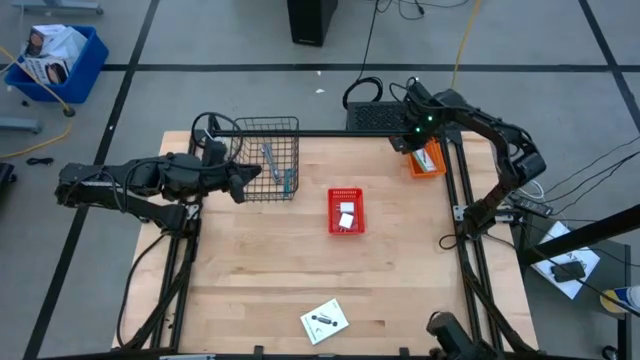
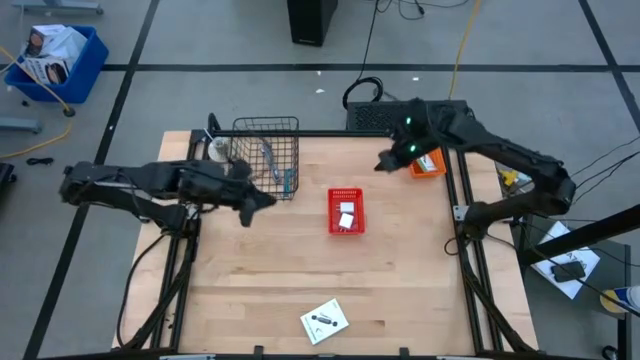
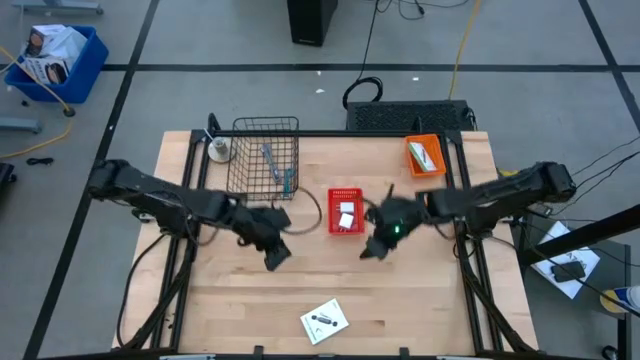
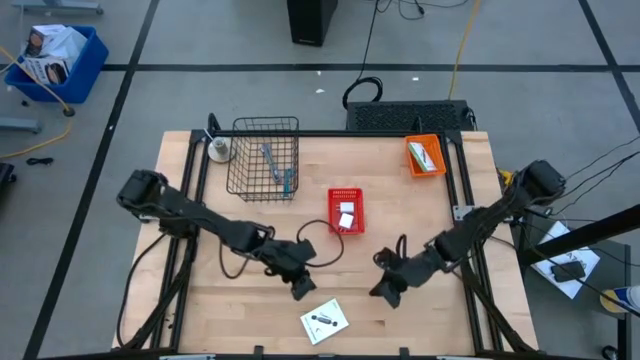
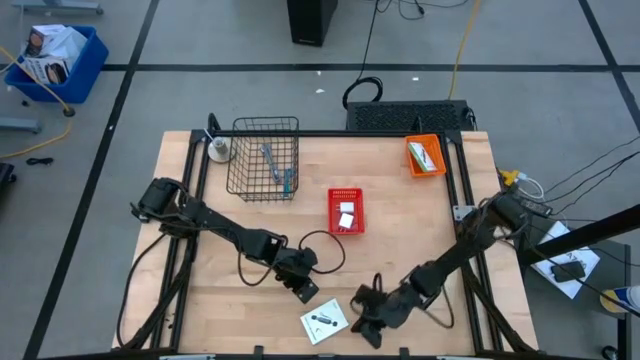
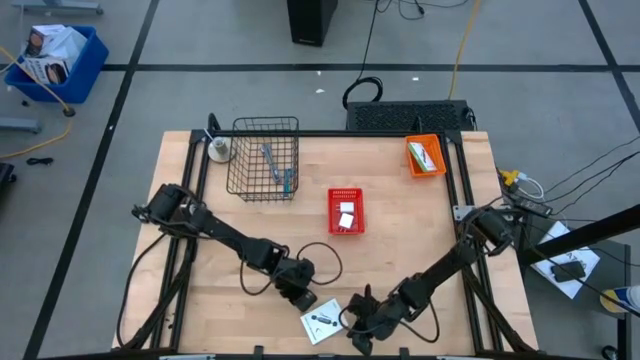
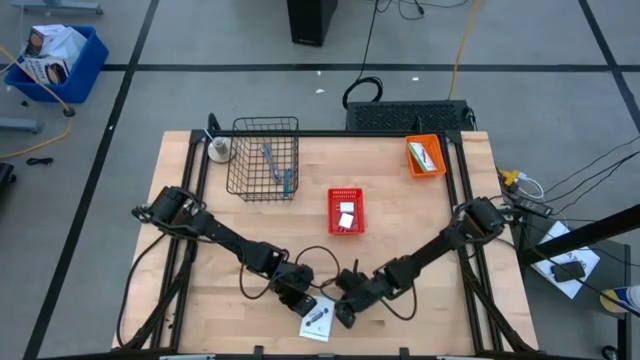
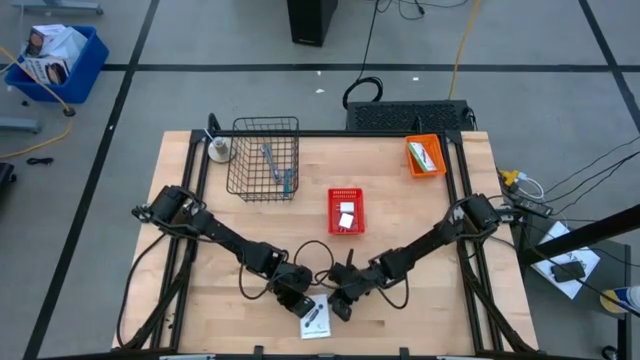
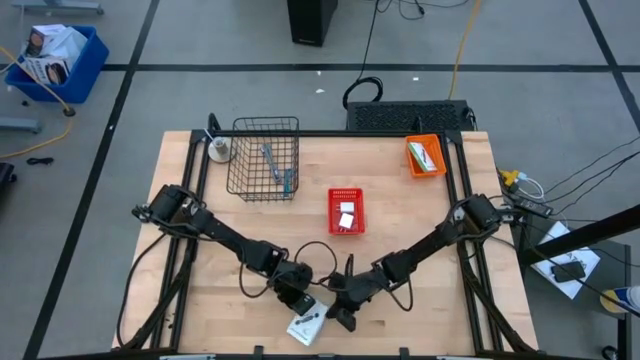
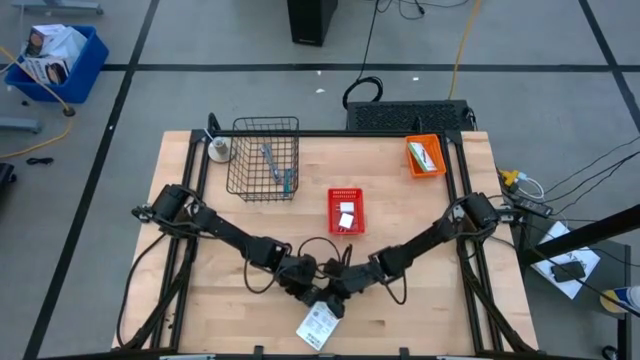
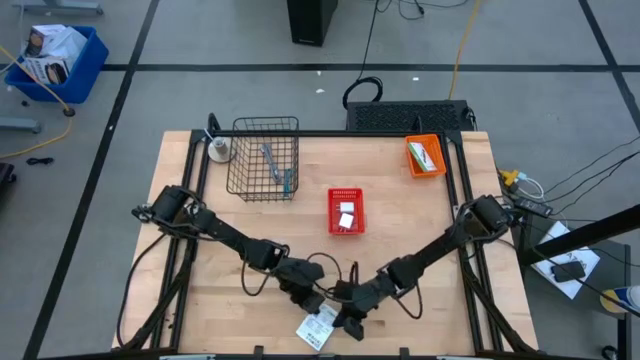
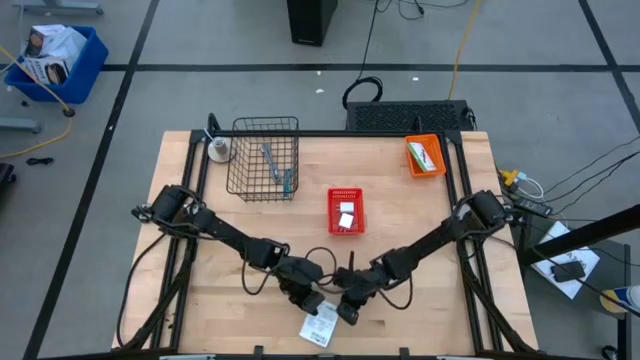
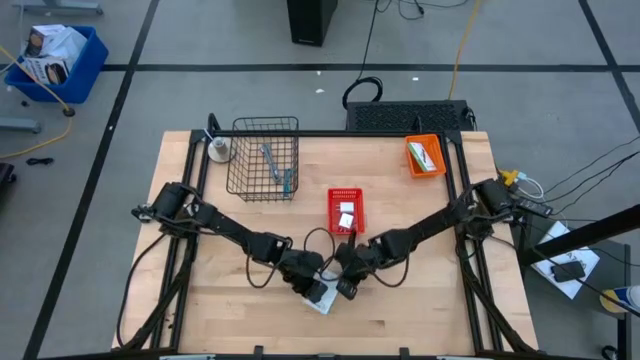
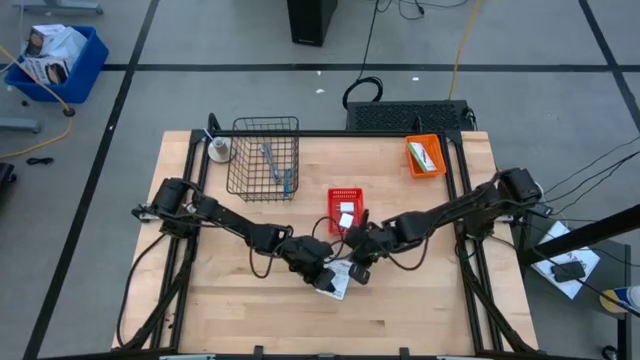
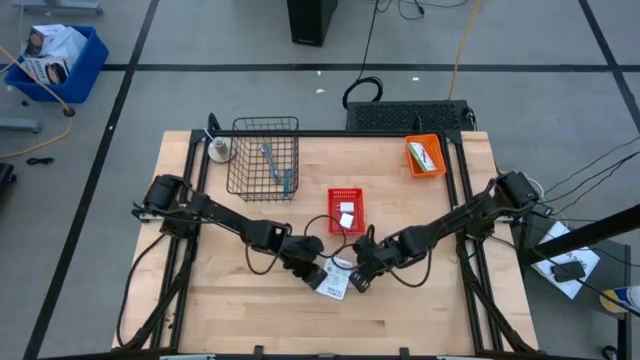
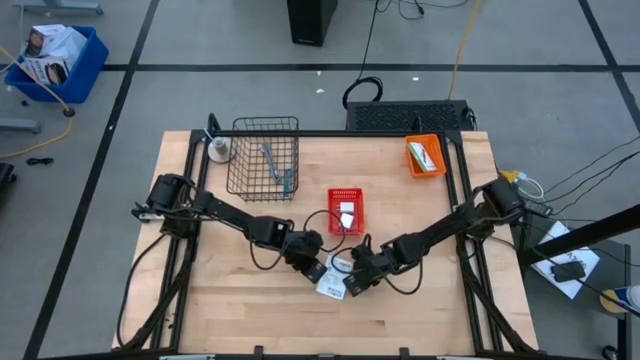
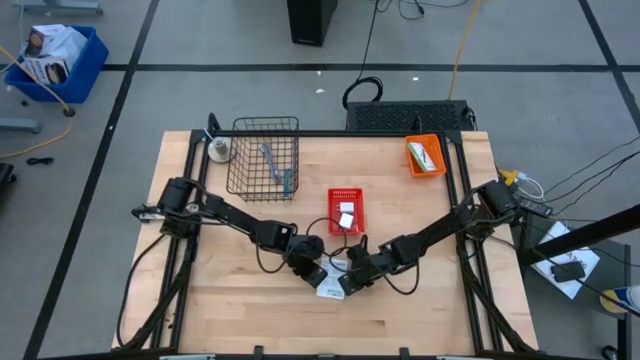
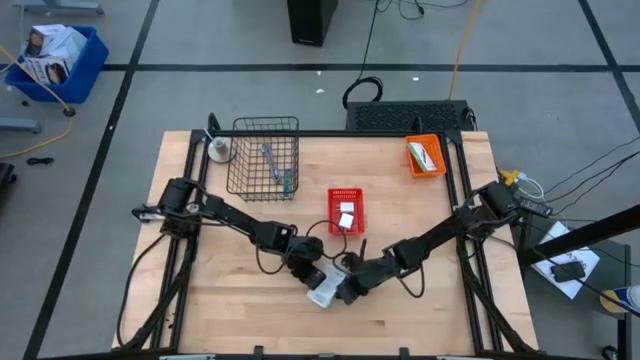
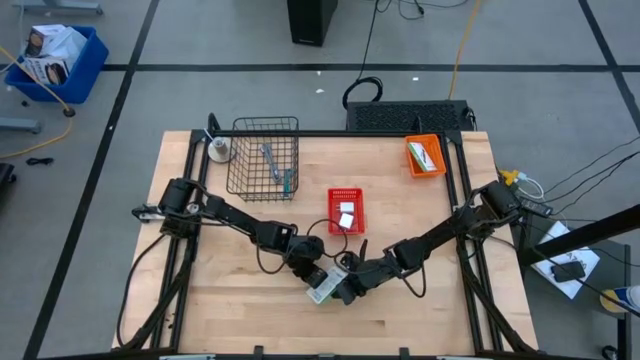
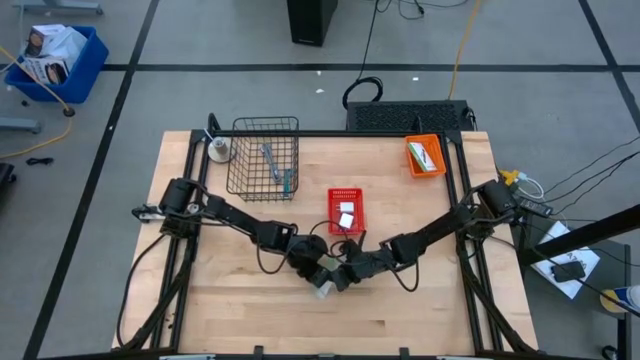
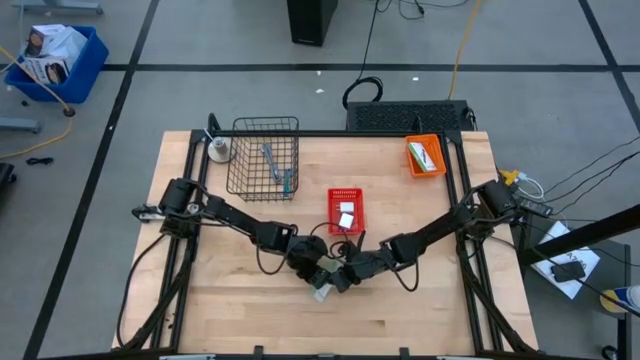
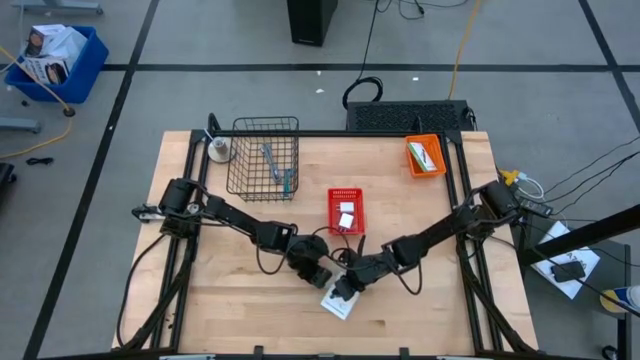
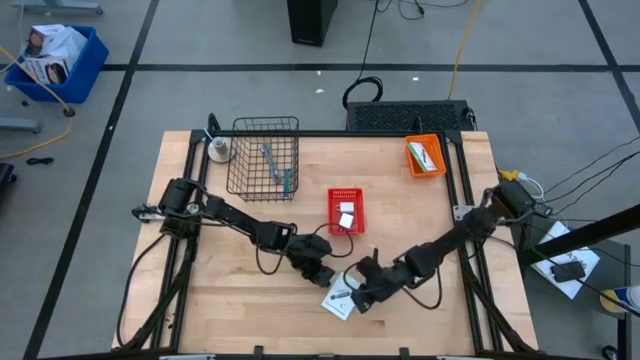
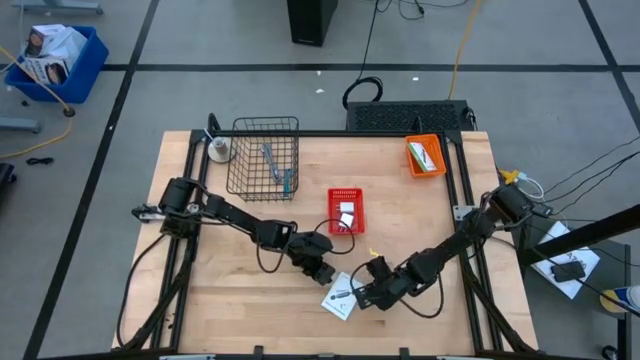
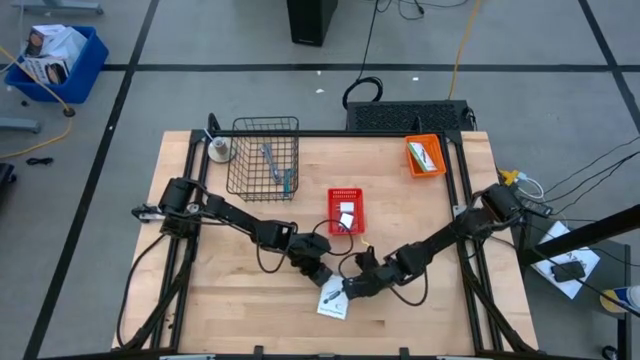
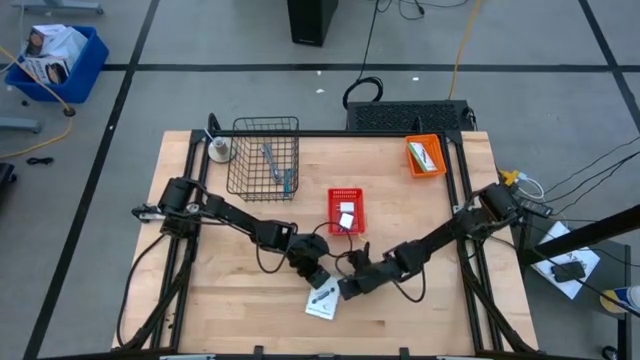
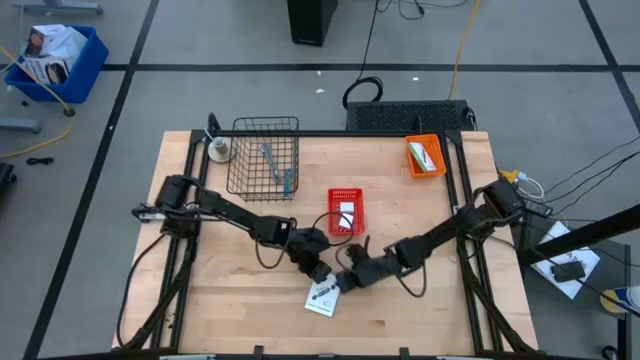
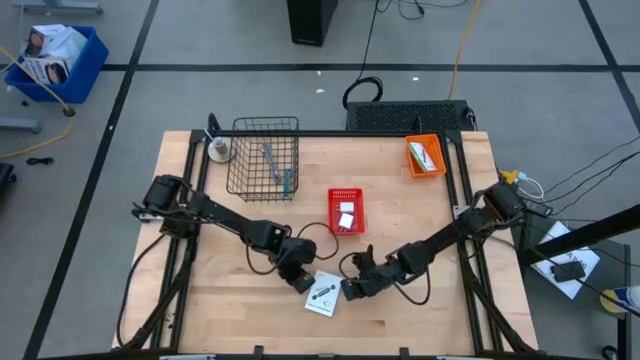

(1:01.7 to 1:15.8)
Task: Pick and place items into bin
Put the white card reader box into the orange bin

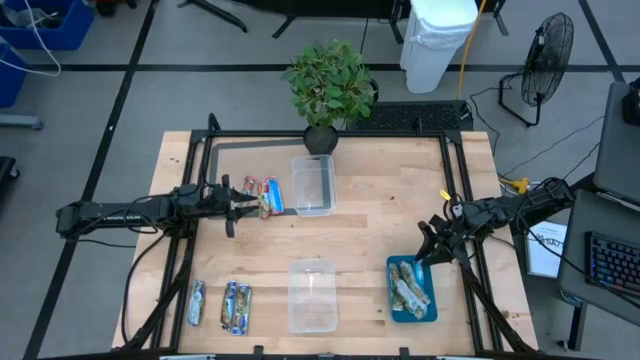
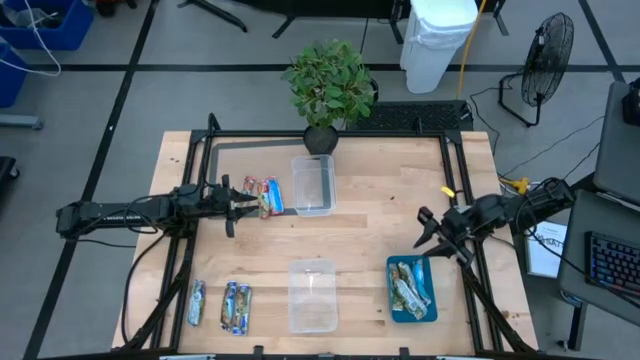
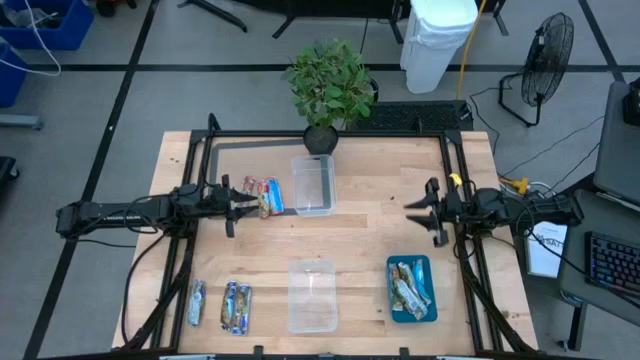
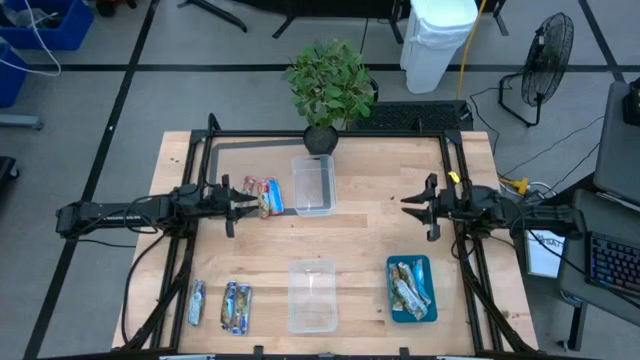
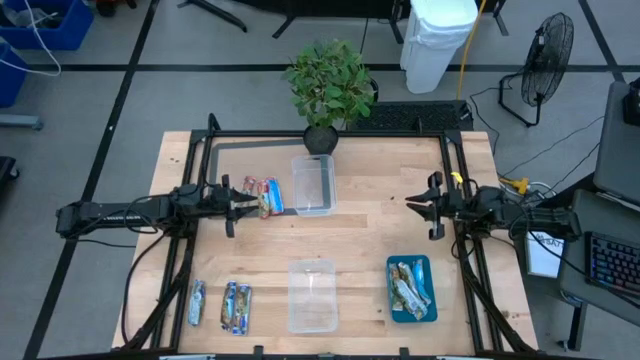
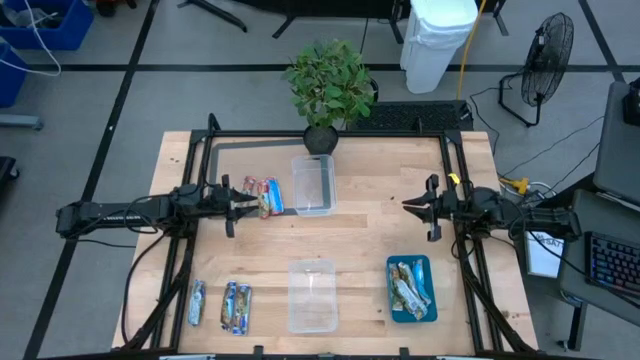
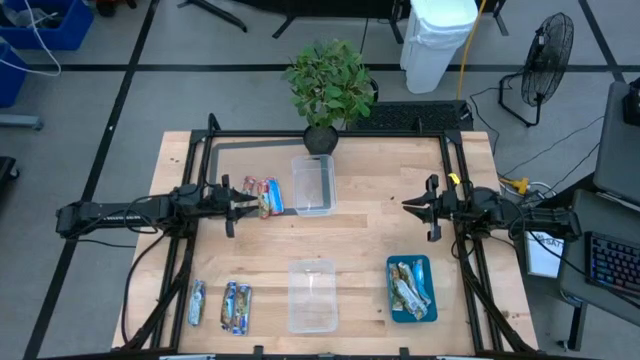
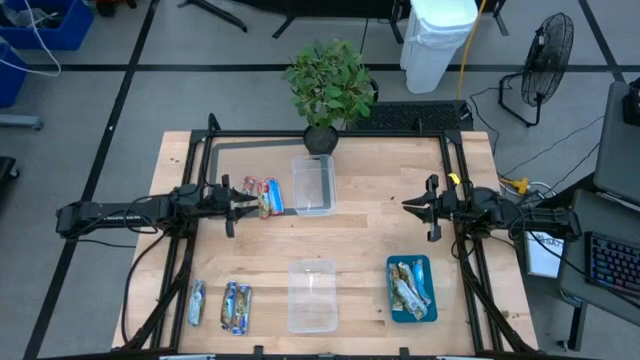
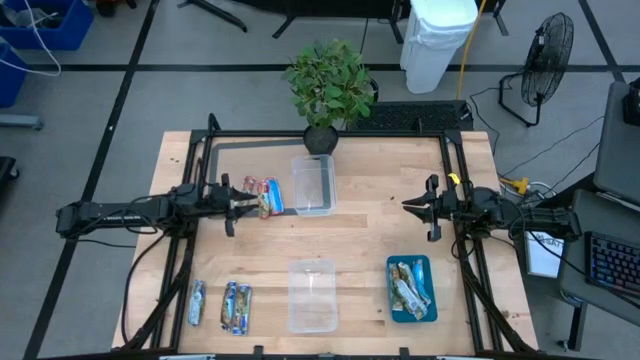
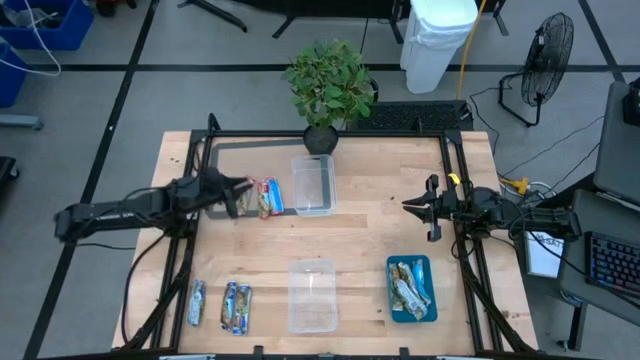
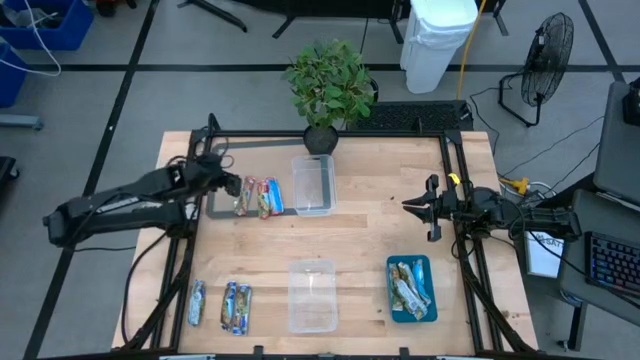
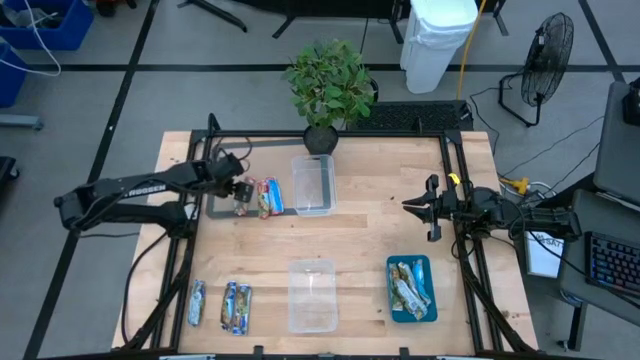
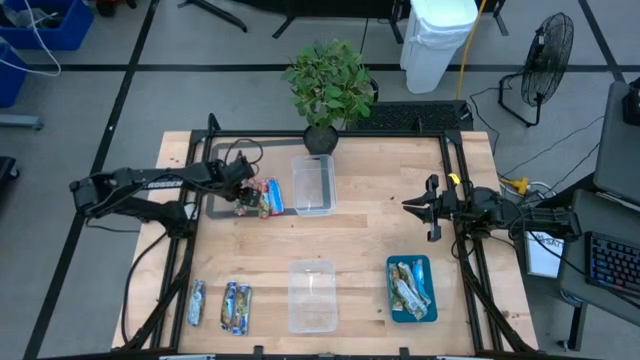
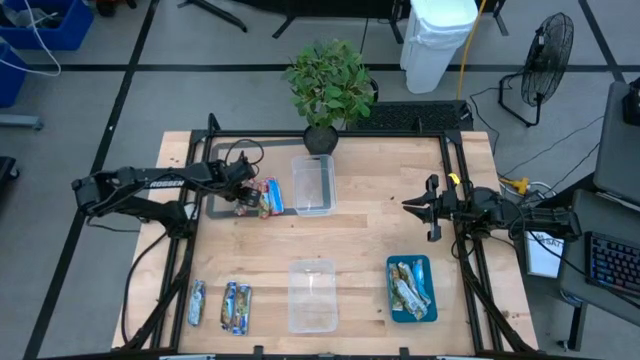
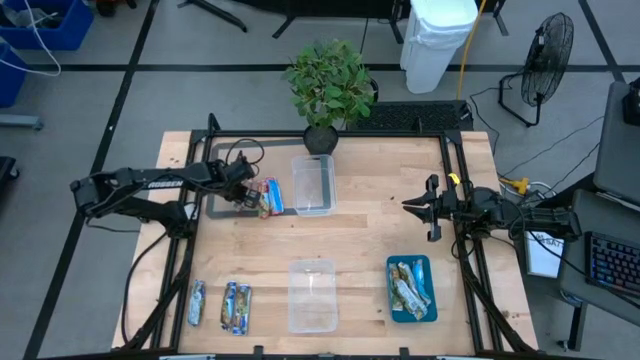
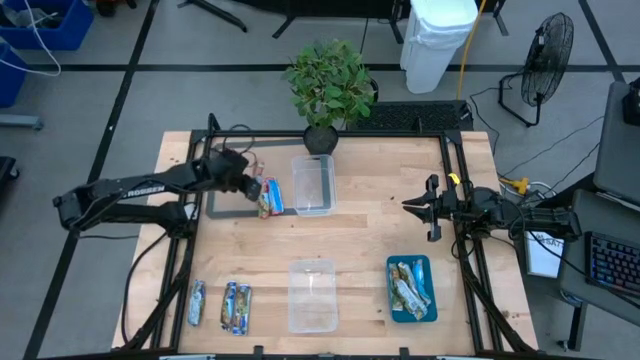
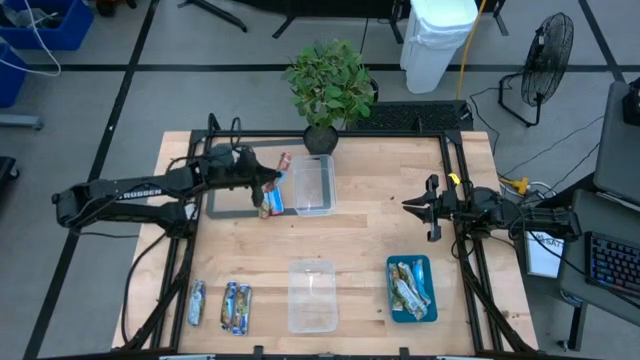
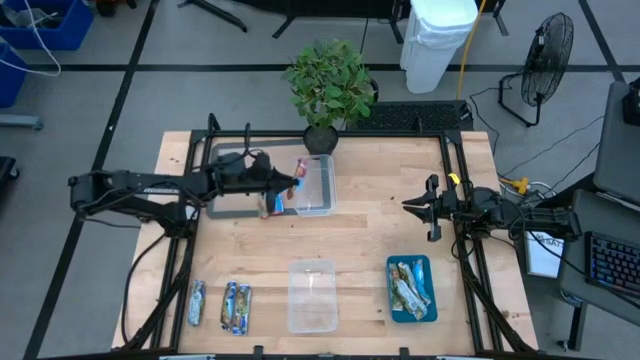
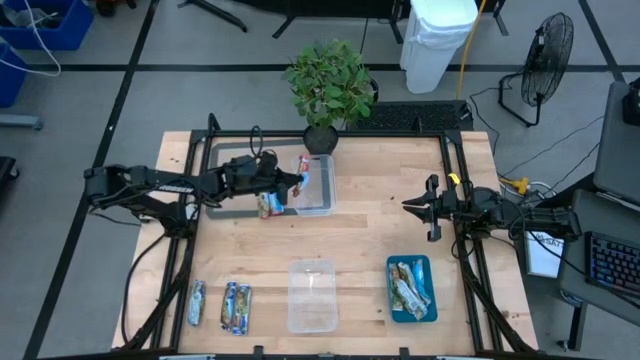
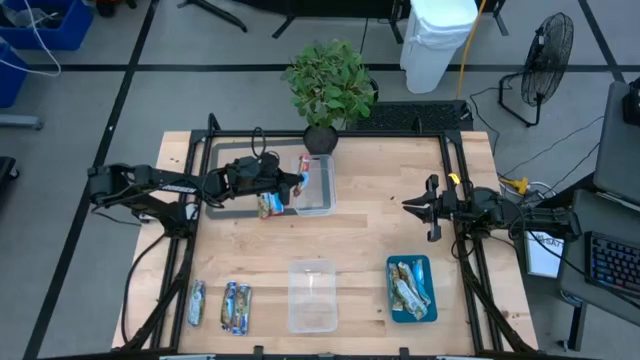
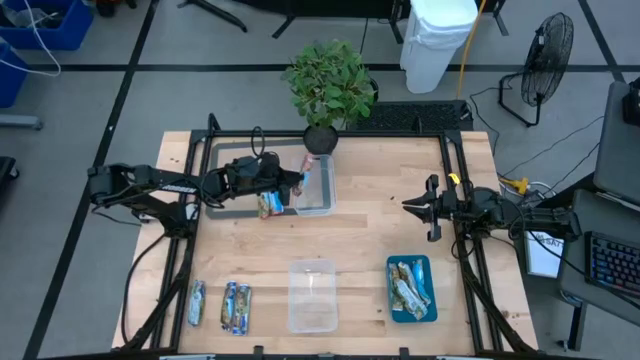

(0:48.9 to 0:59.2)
Task: Pick and place Granola Bars by type
Put the red granola bar into the top transparent bin
